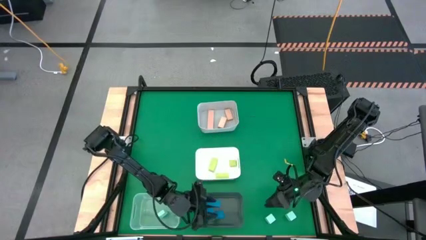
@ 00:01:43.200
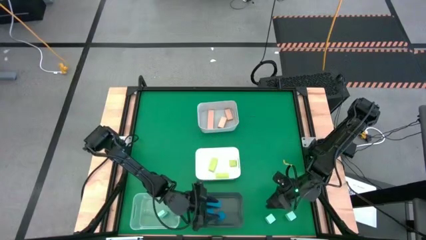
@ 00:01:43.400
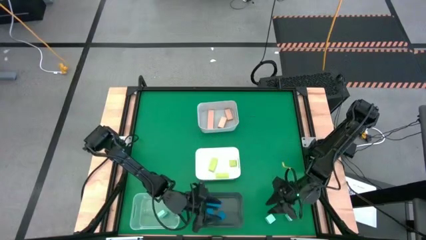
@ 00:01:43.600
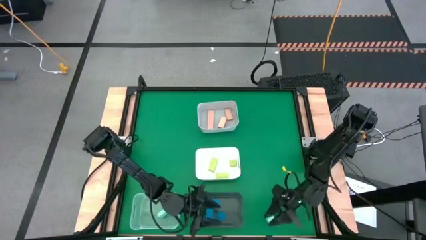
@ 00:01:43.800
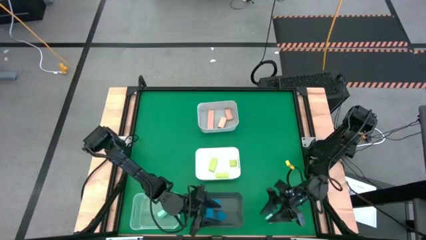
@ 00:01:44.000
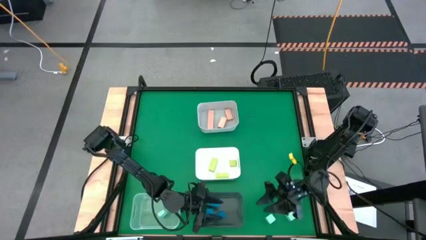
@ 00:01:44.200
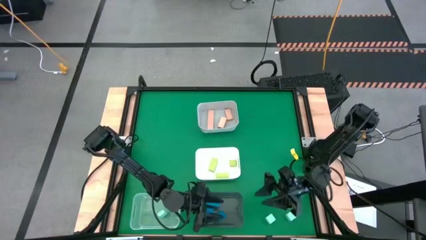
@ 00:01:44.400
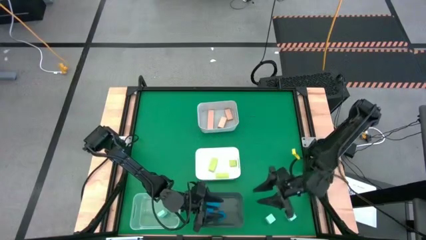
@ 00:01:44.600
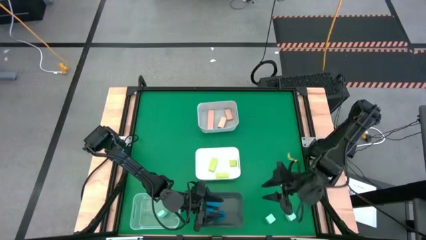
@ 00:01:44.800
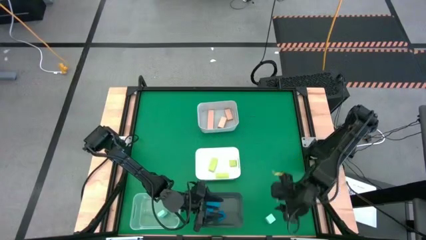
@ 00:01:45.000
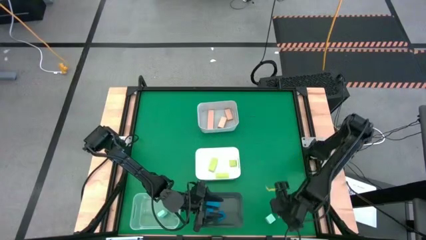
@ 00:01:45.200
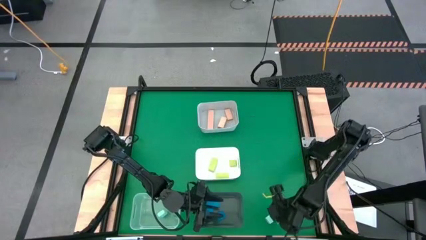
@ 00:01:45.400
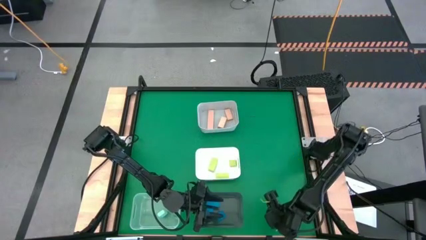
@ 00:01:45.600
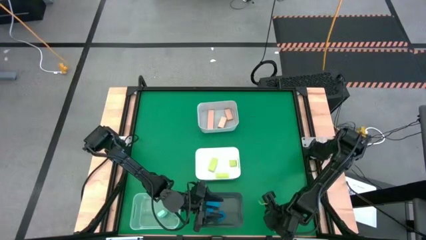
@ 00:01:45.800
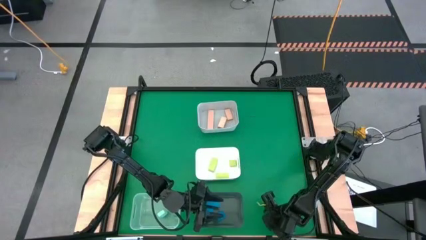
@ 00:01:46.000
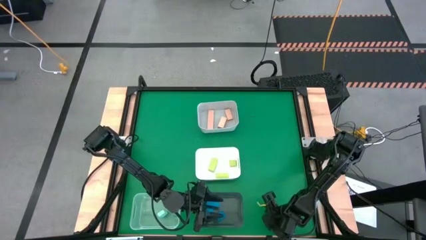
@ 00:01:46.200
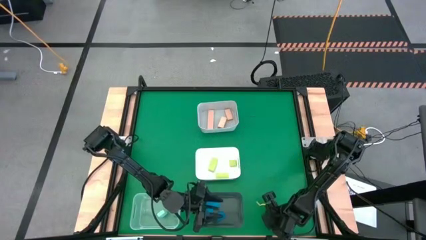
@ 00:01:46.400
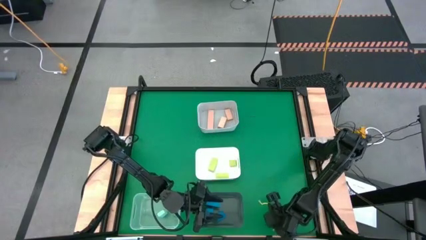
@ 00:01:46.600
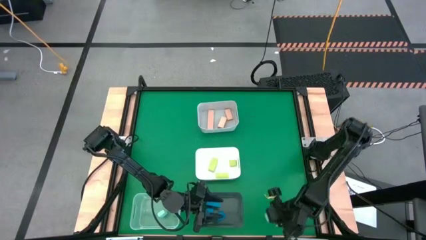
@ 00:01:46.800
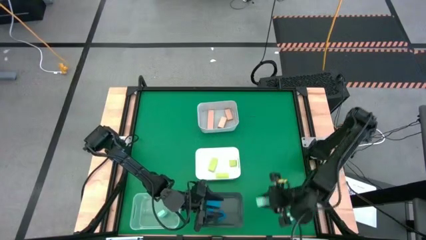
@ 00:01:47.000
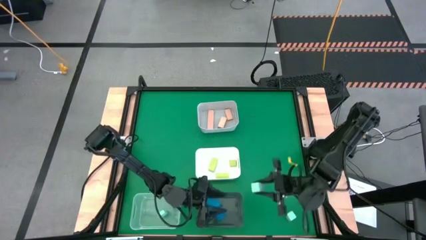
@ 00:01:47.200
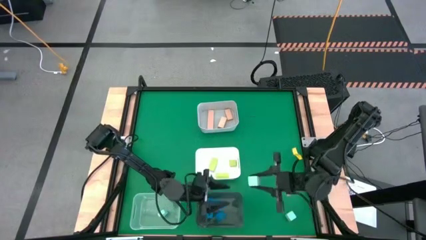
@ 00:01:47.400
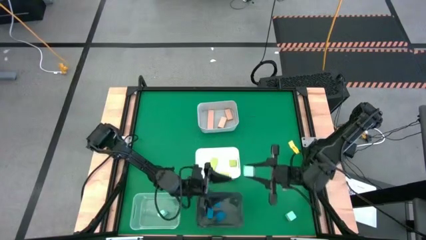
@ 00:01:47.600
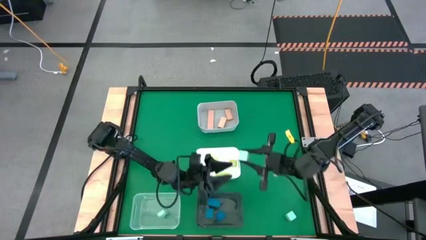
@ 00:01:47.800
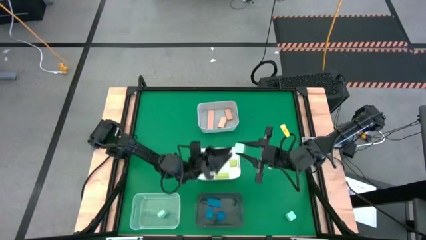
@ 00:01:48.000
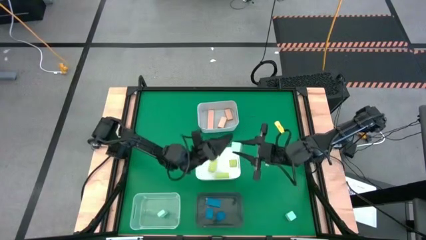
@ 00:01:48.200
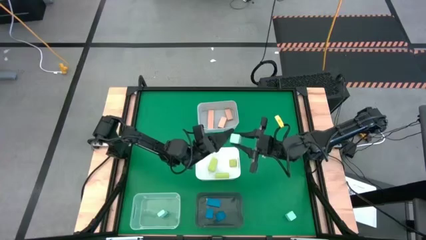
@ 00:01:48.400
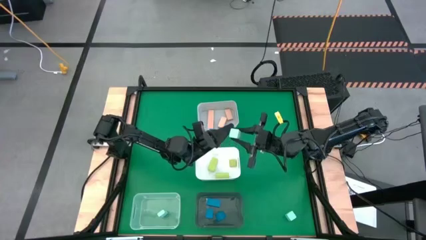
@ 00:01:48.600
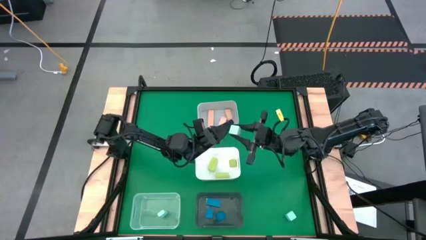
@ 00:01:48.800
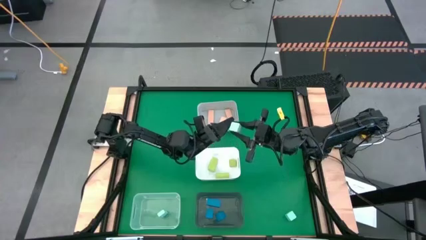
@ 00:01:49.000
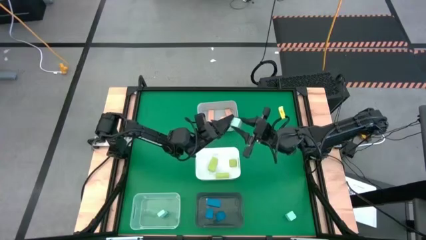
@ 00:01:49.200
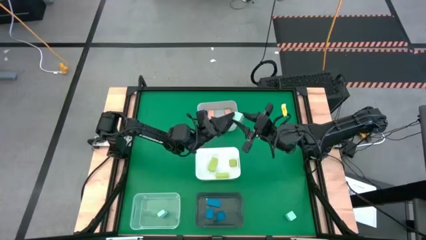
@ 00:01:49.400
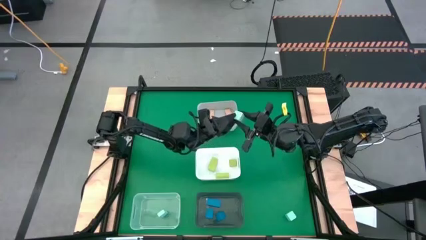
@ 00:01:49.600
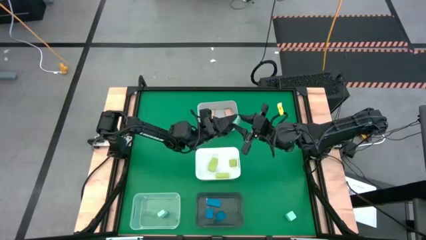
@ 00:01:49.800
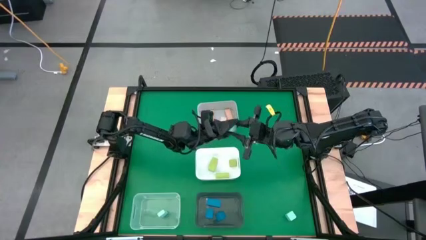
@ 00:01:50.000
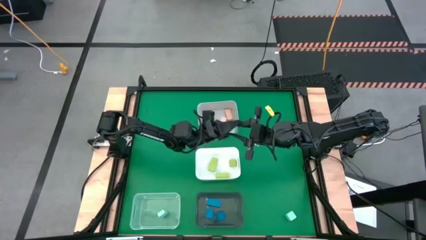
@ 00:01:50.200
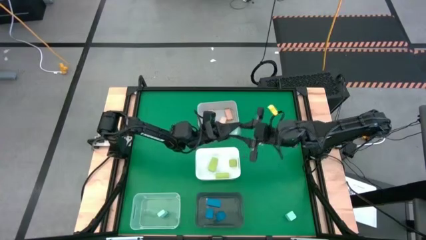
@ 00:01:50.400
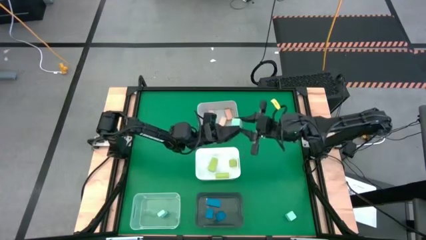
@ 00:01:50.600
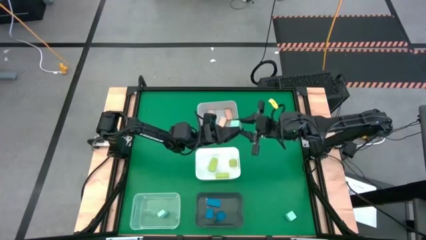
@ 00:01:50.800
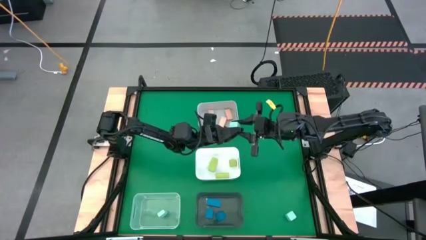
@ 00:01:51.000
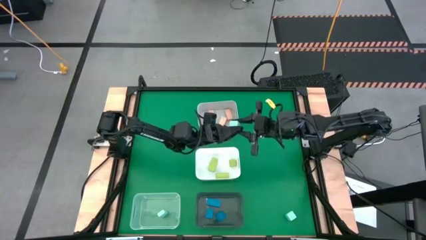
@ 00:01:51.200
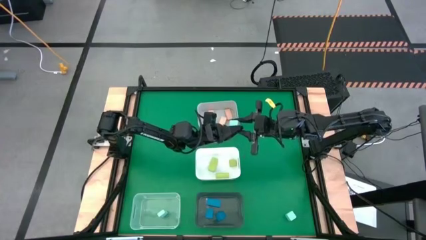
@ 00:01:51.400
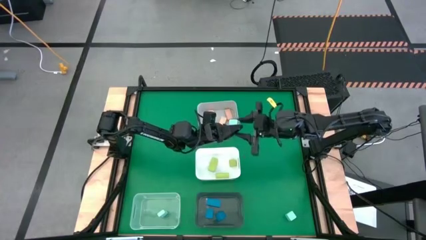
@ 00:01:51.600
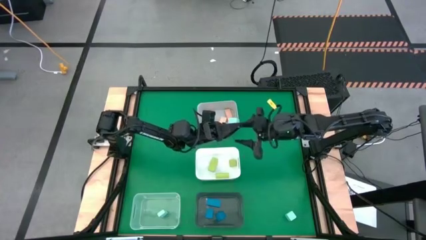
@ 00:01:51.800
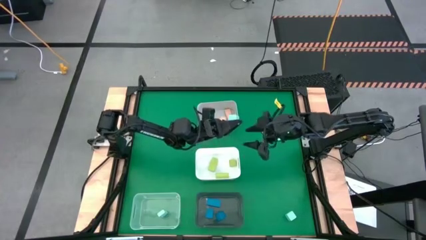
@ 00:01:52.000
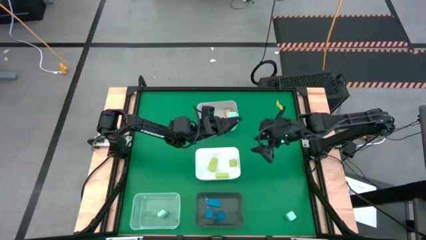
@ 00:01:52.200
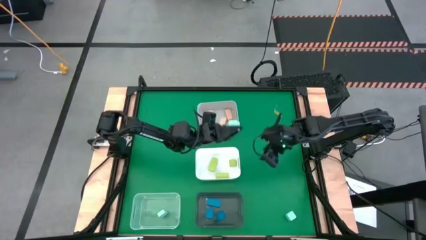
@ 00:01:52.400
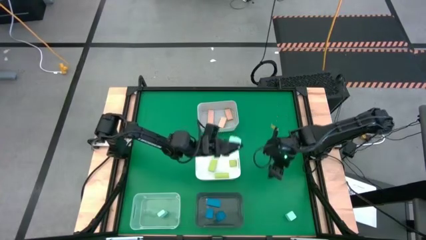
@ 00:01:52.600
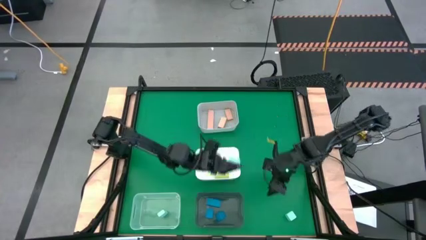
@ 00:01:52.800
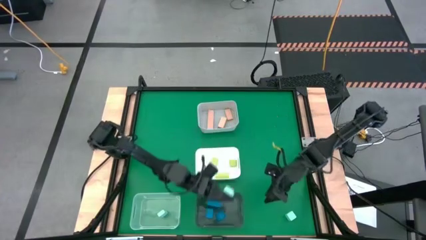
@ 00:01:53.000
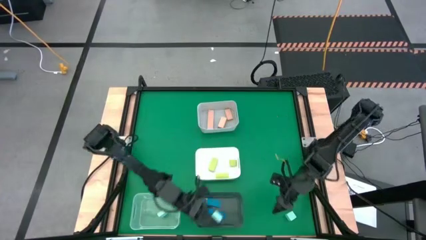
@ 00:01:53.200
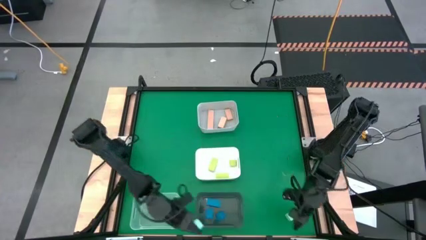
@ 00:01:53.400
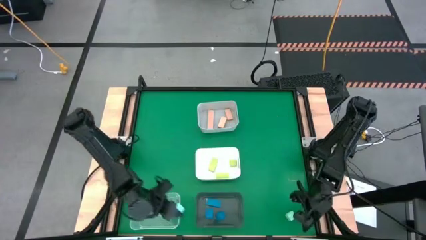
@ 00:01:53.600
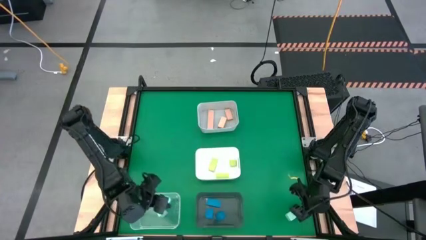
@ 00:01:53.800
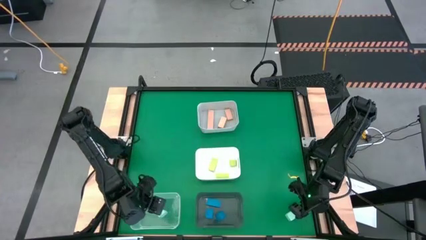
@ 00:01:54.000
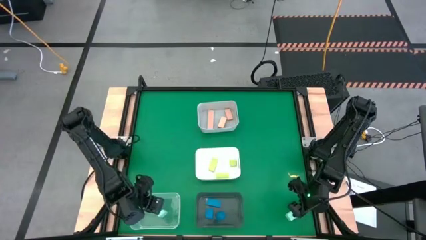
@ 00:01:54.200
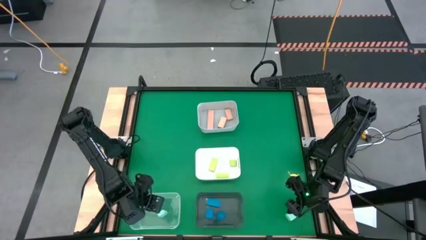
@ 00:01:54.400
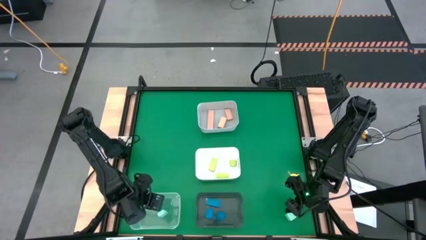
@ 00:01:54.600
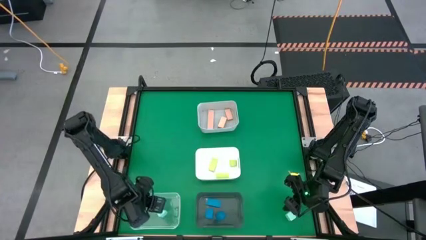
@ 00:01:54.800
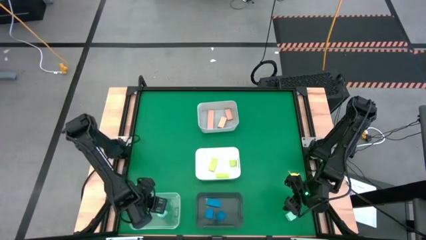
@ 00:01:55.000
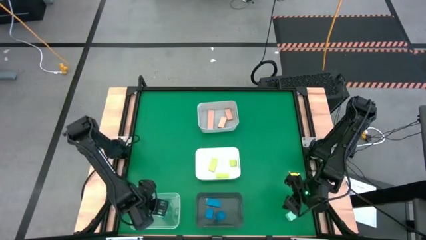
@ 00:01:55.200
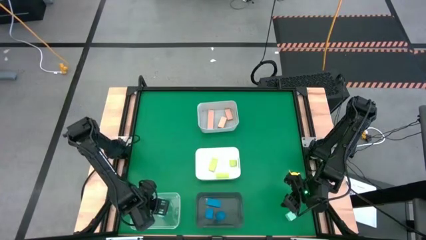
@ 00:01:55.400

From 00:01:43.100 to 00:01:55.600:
Task: Sort & place blocks by color
Put the left light blue block into the transparent bin

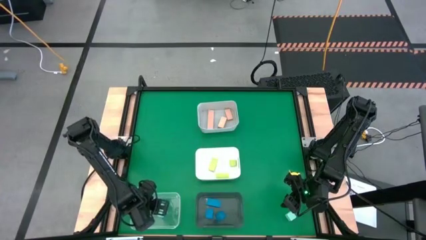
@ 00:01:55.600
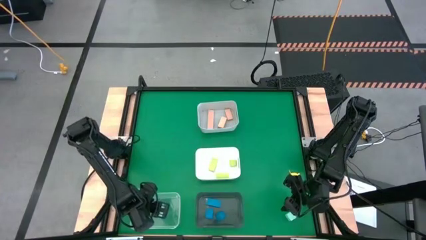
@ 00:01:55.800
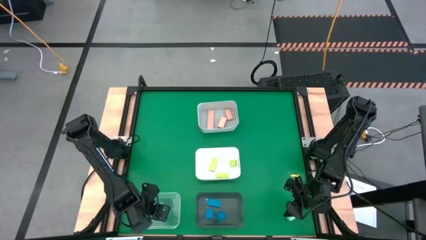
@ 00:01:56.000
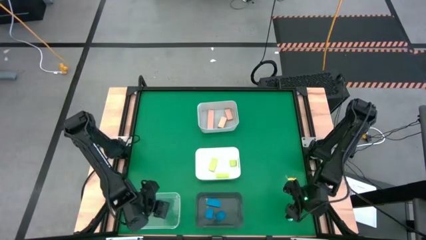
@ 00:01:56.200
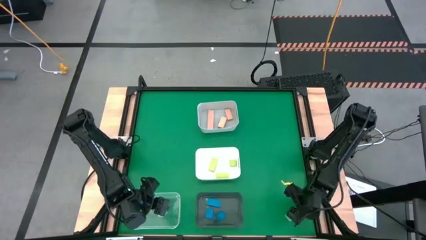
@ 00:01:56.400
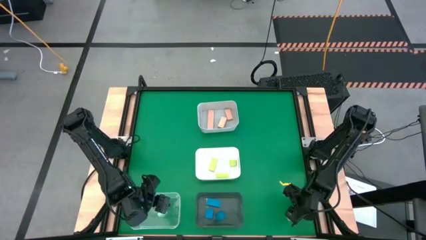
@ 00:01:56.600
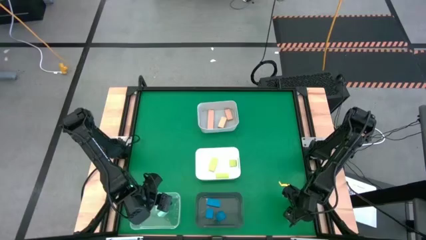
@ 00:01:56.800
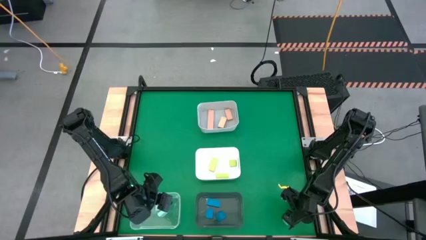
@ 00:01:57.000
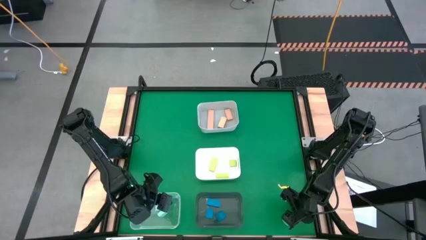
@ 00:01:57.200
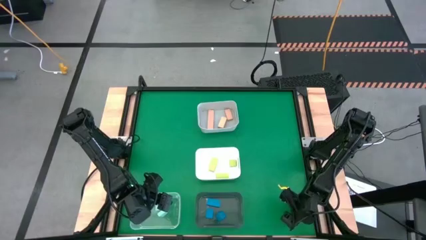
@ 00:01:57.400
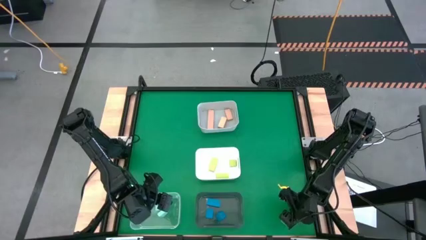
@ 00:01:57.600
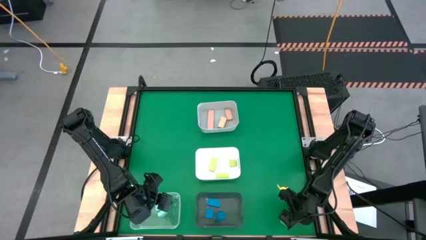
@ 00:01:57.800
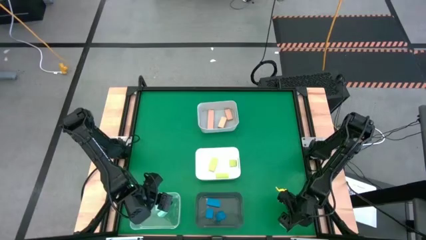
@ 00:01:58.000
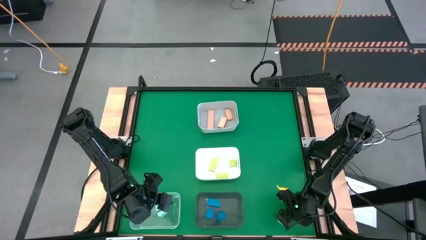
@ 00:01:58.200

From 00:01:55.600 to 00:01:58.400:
Put the light blue block into the transparent bin
